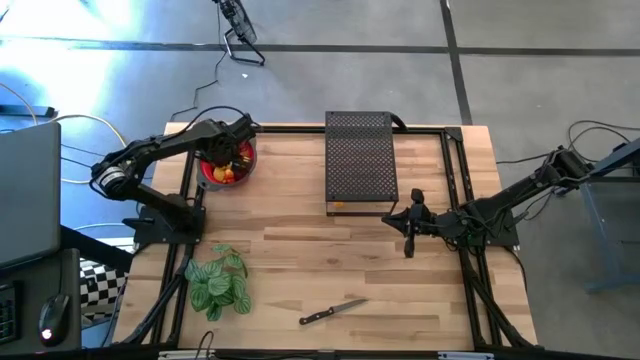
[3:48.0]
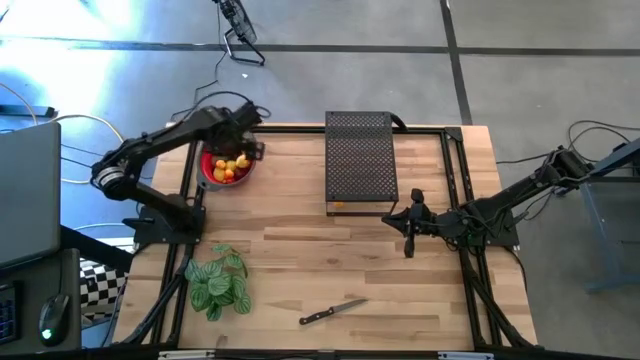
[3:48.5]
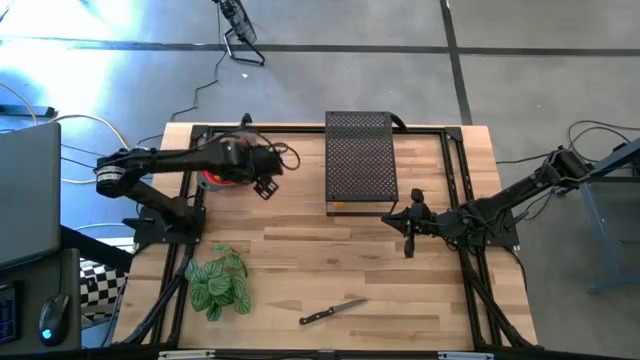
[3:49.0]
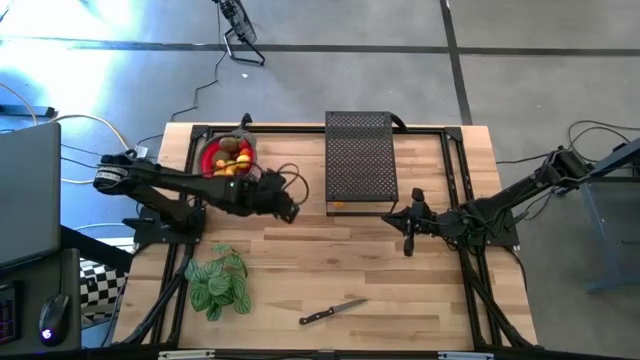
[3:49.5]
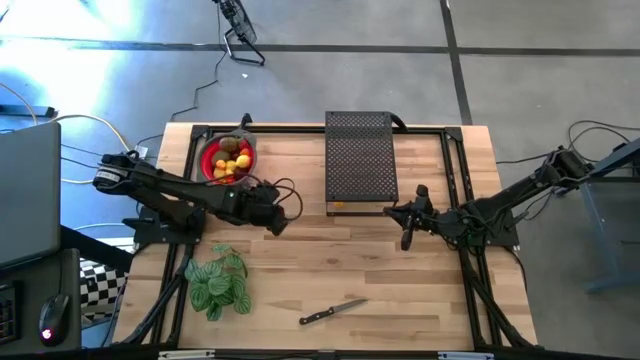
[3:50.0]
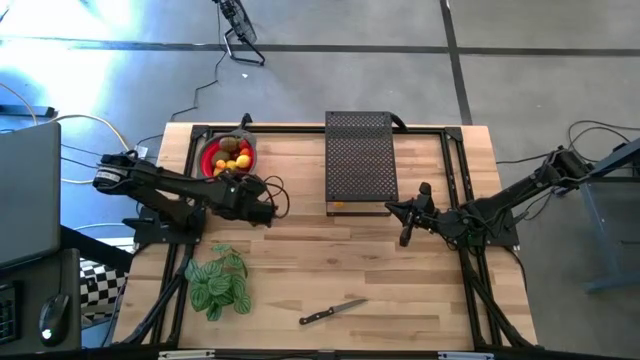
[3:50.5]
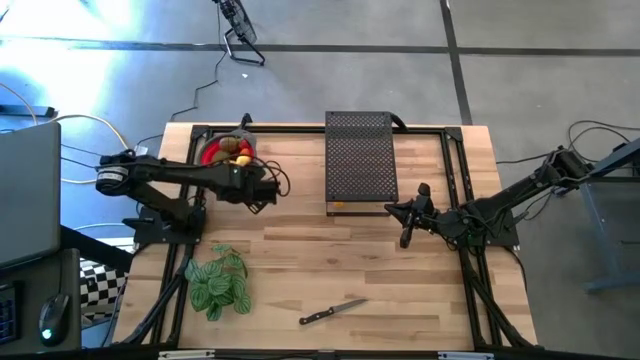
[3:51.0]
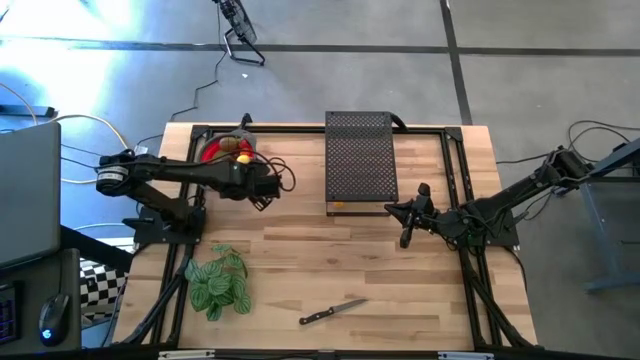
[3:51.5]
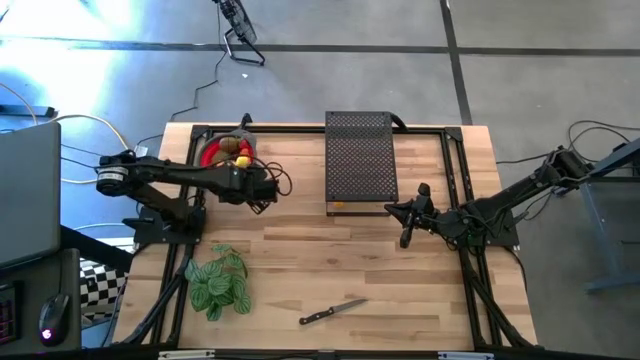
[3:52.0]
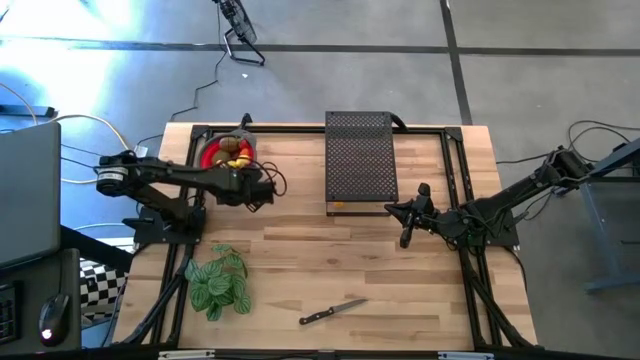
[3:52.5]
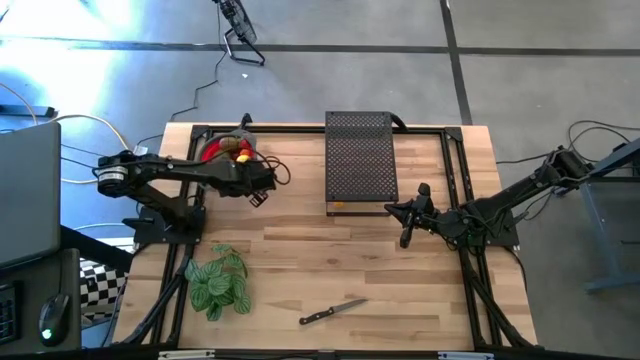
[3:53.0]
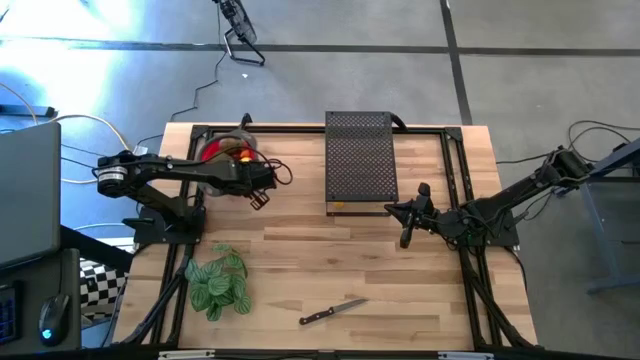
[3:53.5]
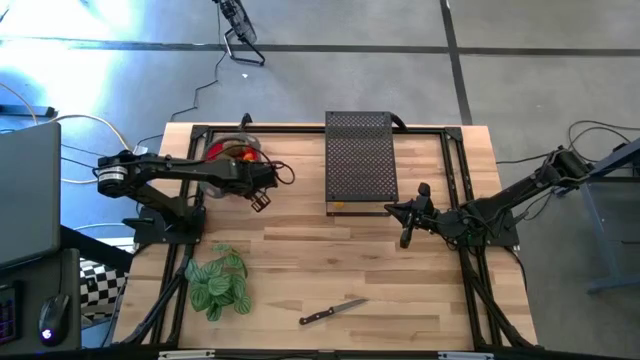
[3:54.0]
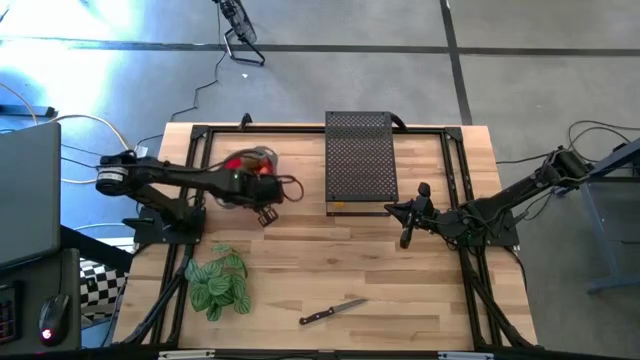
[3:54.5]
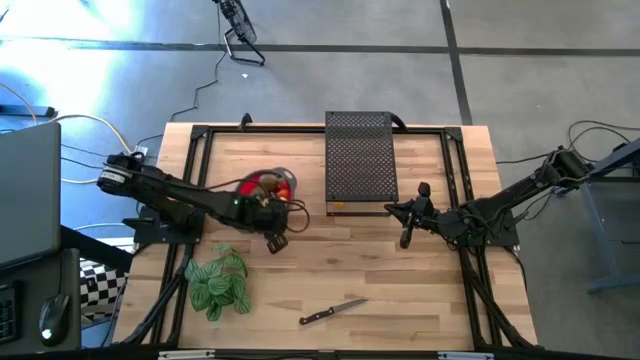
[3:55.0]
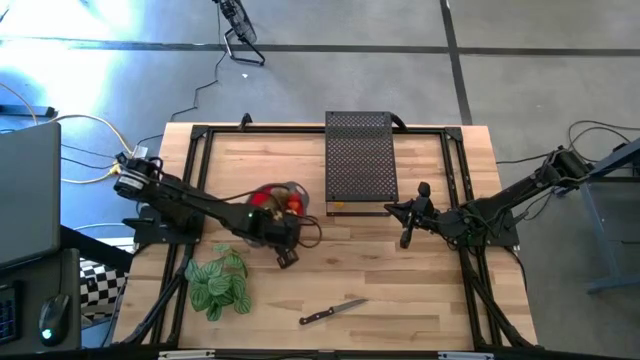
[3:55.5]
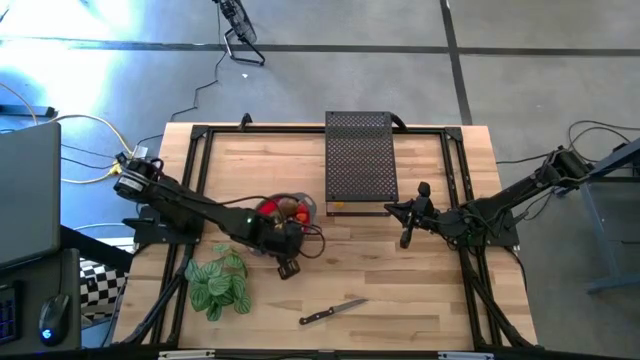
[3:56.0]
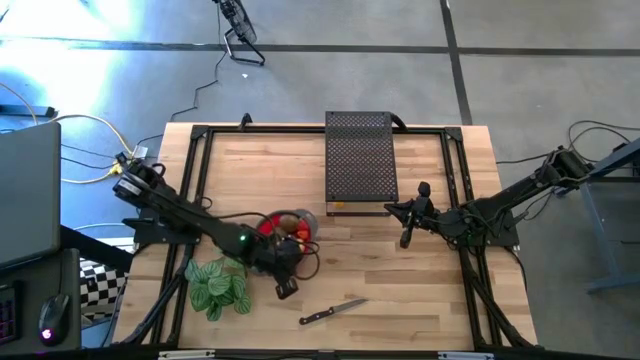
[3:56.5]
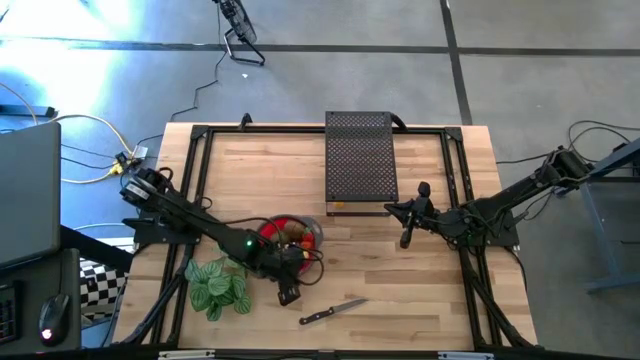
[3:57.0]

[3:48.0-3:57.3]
Task: Pick & Place Fruit
Move the strainer bowl to the center of the table

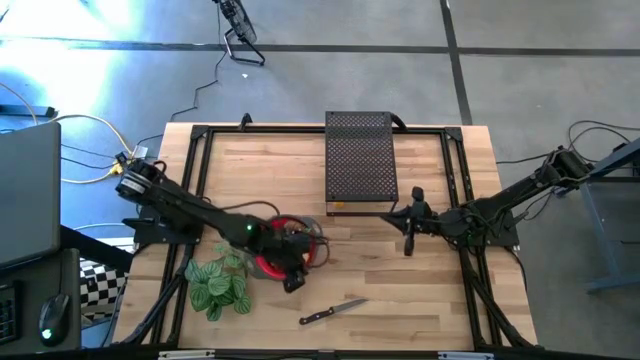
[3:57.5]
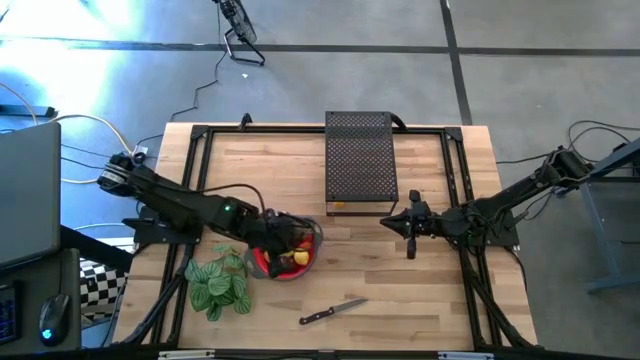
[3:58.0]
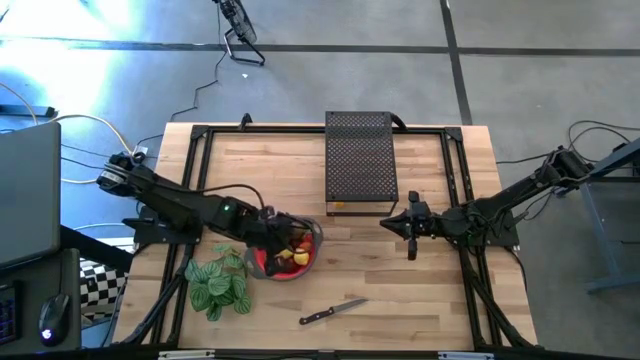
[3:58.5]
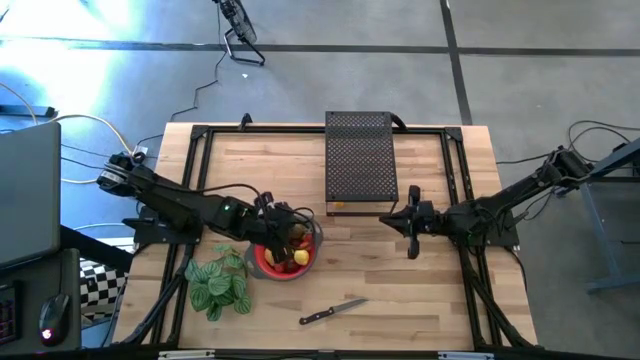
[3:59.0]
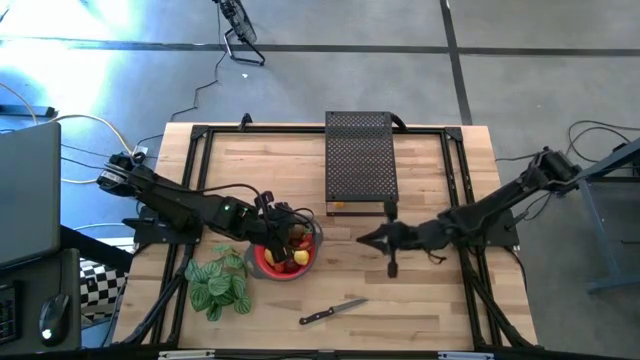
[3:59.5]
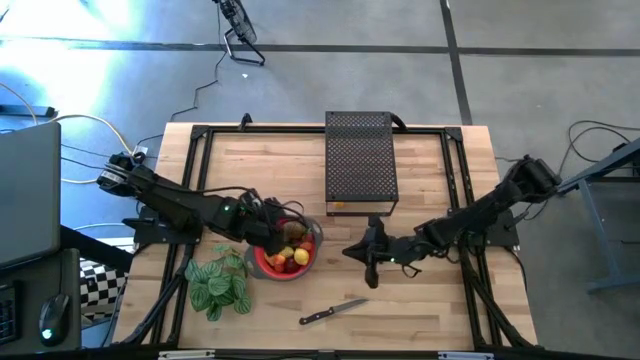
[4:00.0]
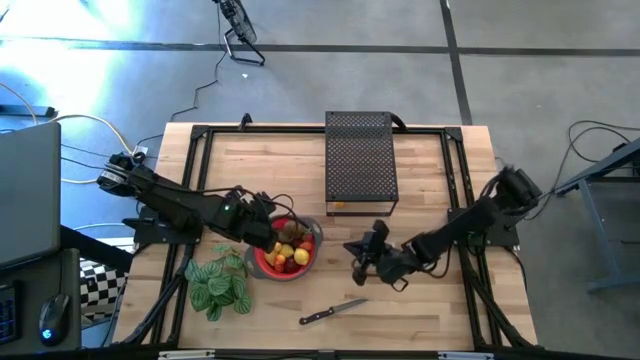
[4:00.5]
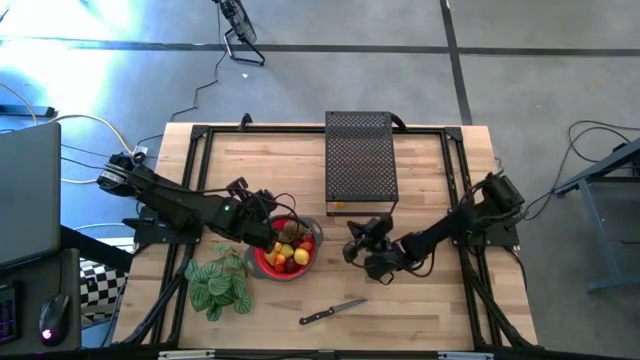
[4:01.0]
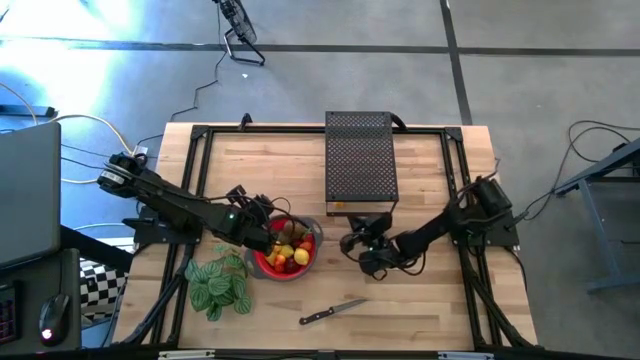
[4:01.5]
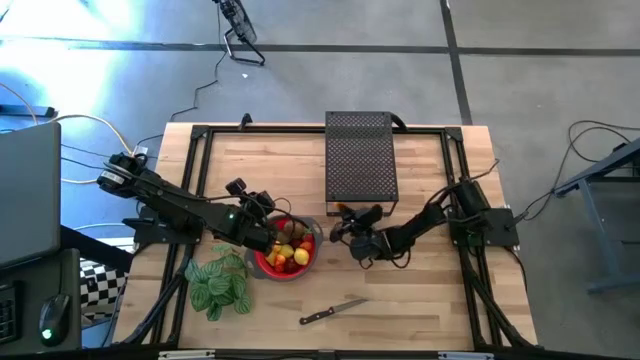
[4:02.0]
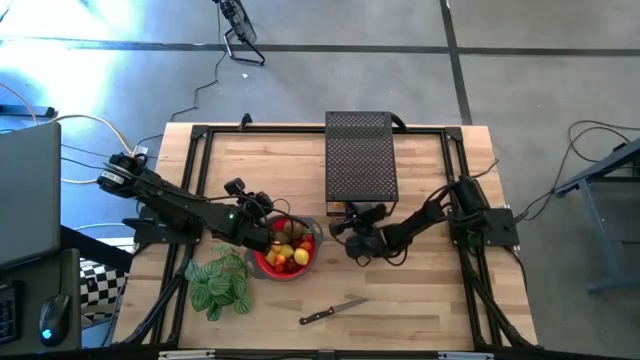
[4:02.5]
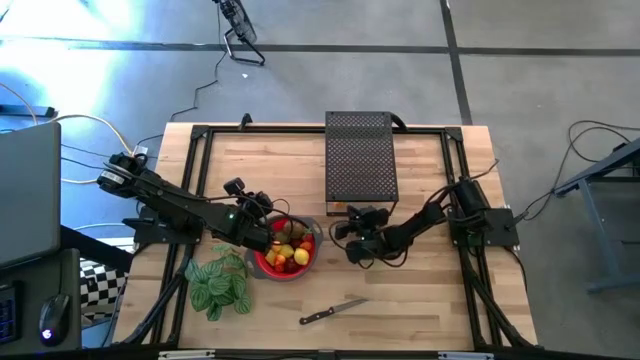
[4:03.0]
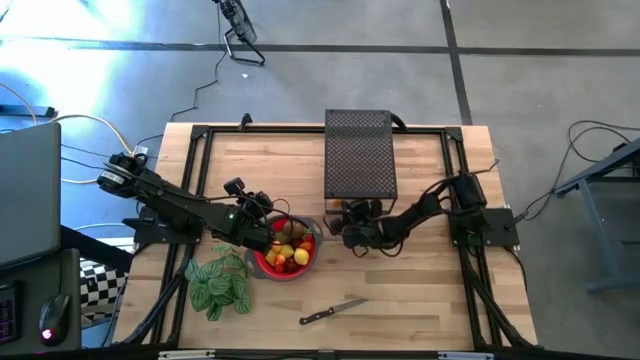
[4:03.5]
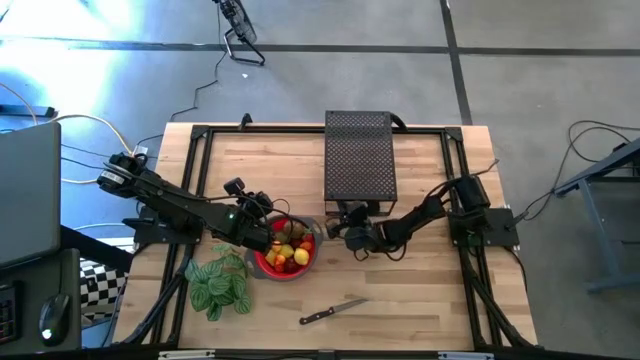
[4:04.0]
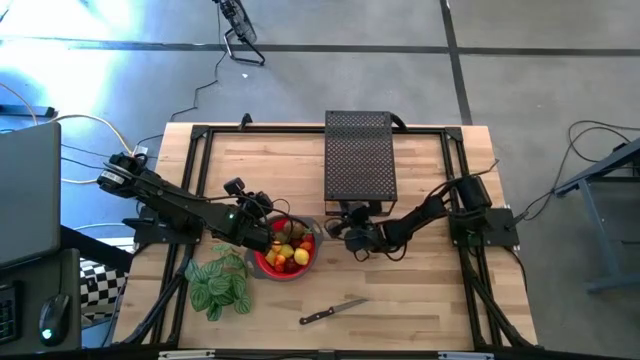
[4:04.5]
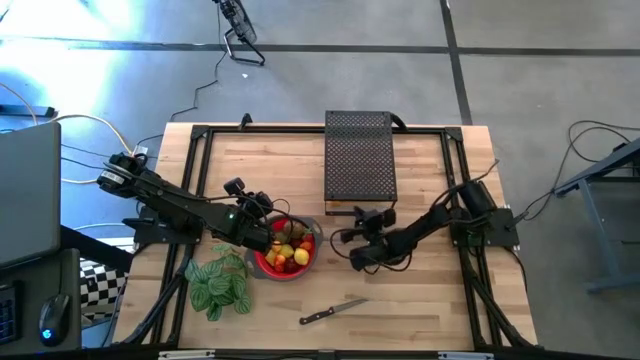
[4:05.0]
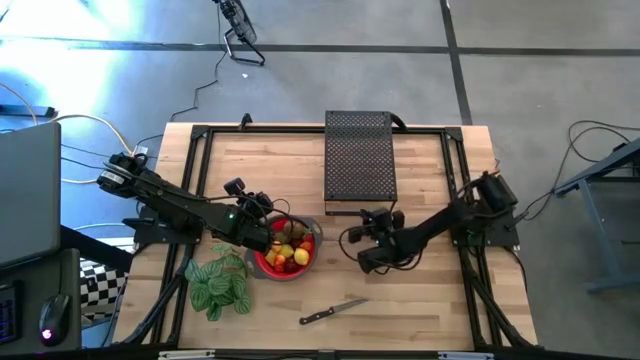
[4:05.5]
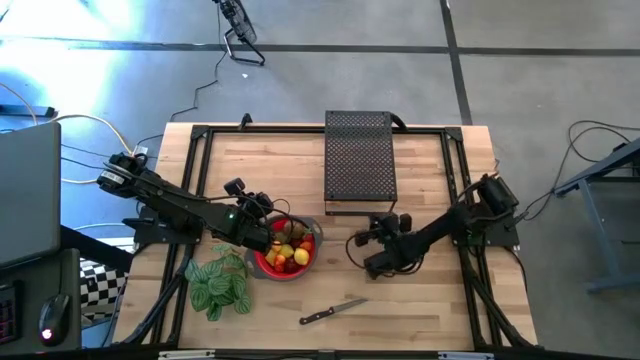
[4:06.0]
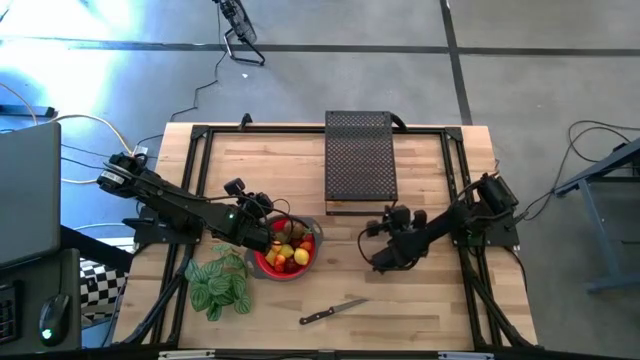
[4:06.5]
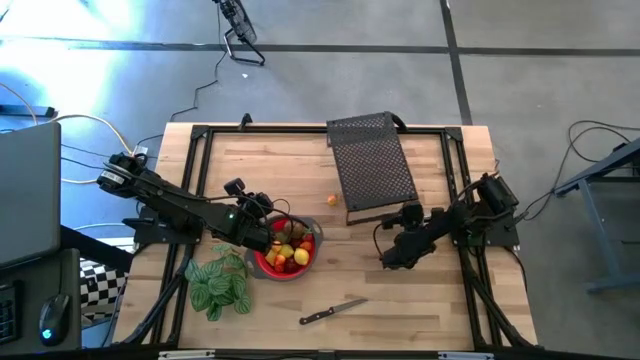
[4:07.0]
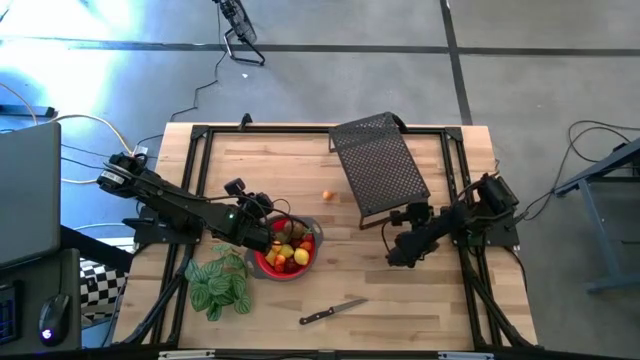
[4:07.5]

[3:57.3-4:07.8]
Adjust the shelf
